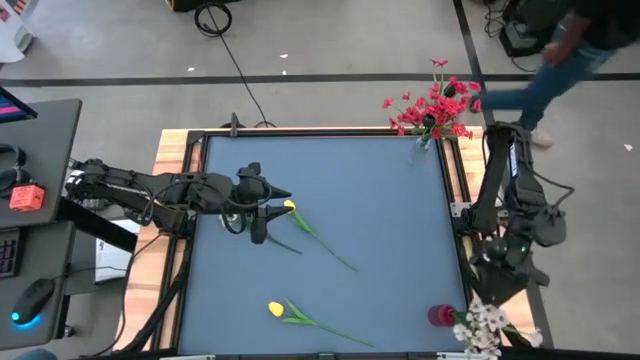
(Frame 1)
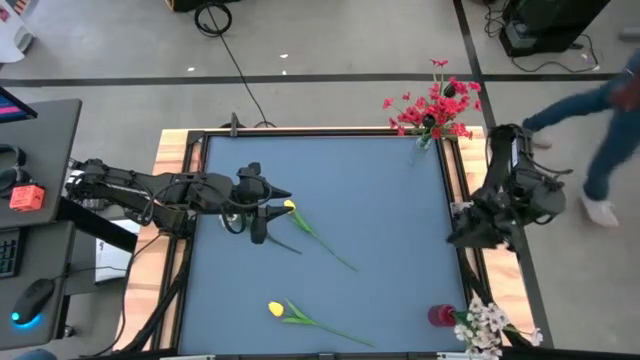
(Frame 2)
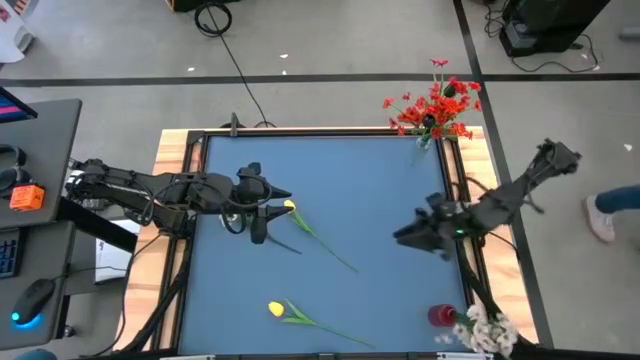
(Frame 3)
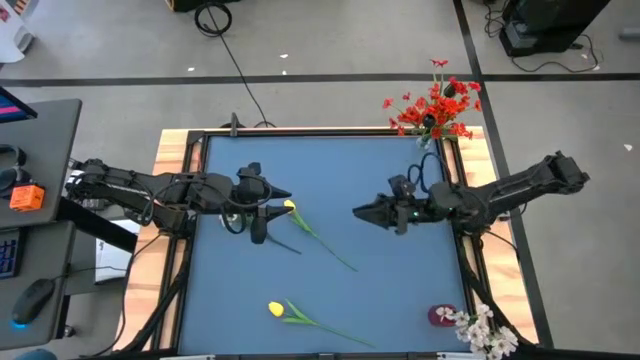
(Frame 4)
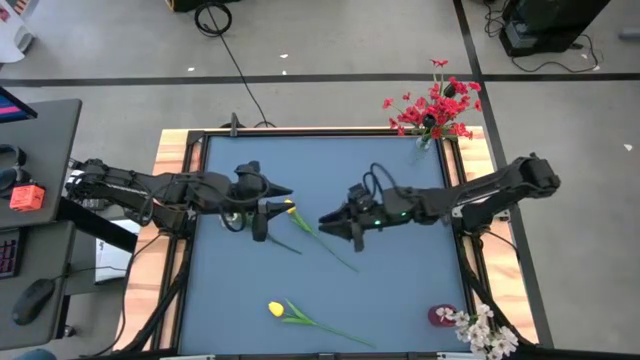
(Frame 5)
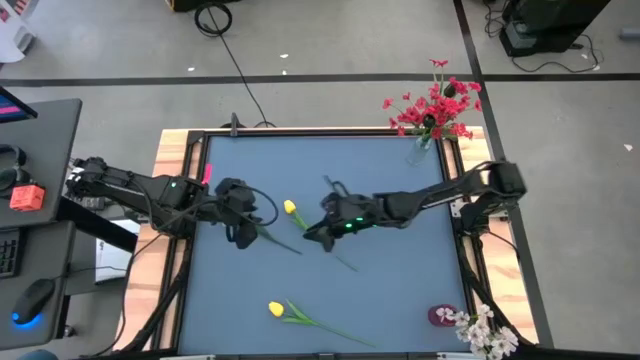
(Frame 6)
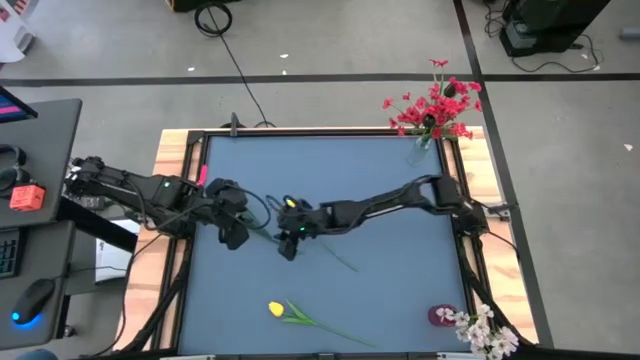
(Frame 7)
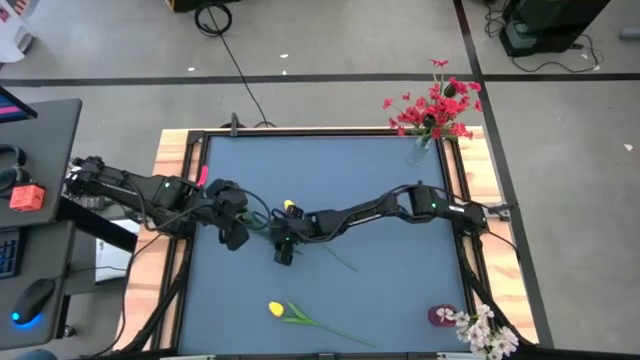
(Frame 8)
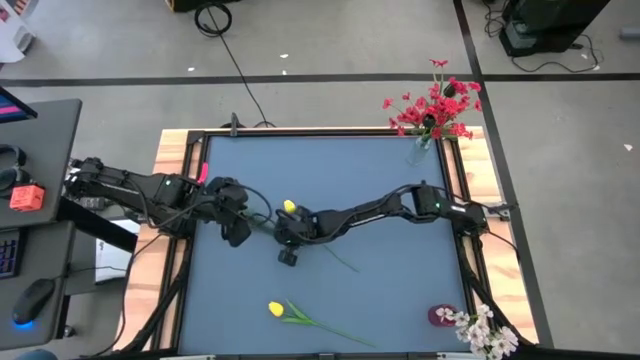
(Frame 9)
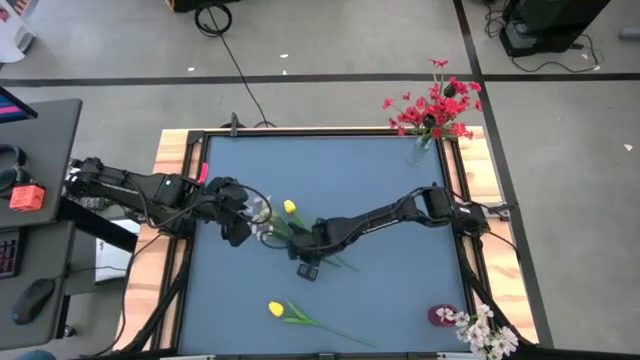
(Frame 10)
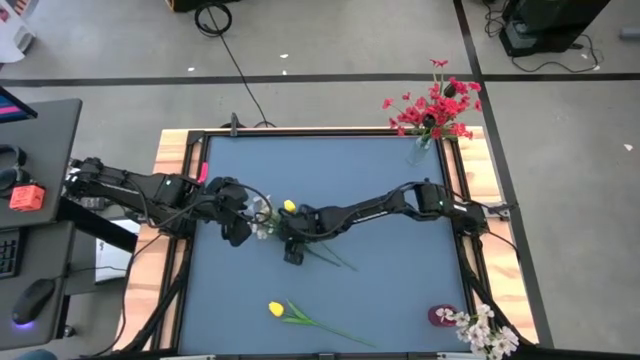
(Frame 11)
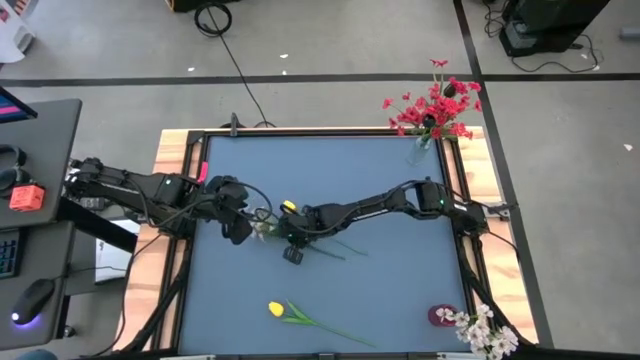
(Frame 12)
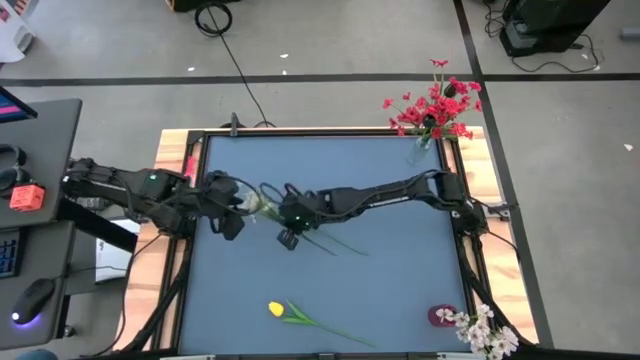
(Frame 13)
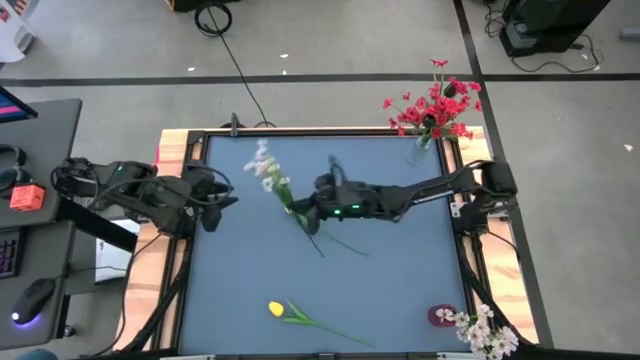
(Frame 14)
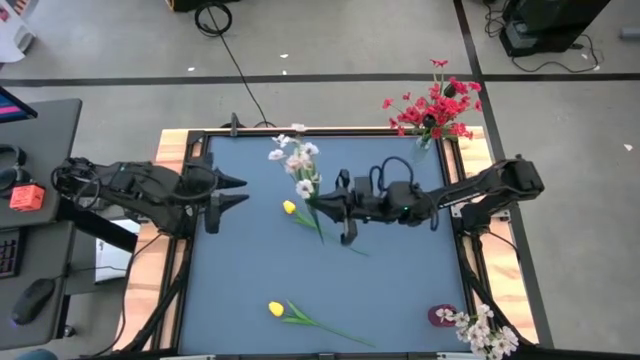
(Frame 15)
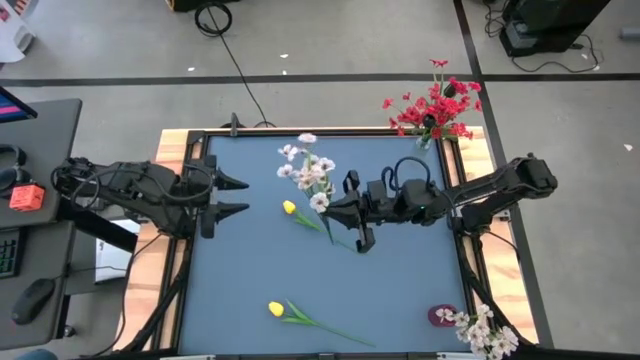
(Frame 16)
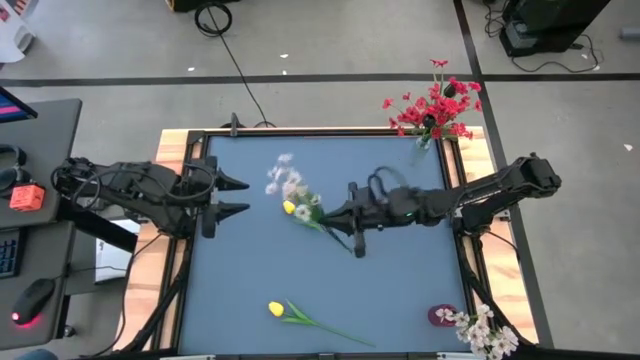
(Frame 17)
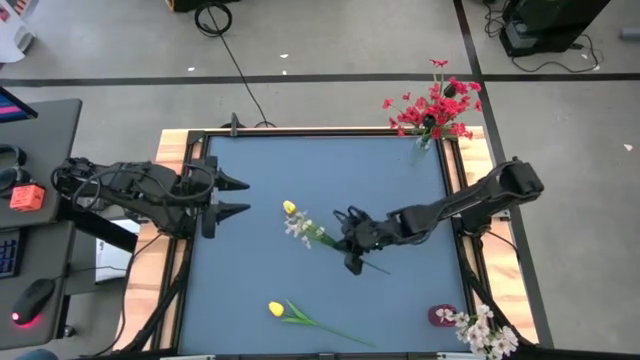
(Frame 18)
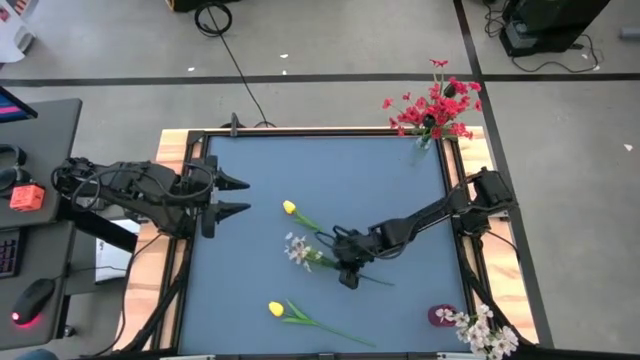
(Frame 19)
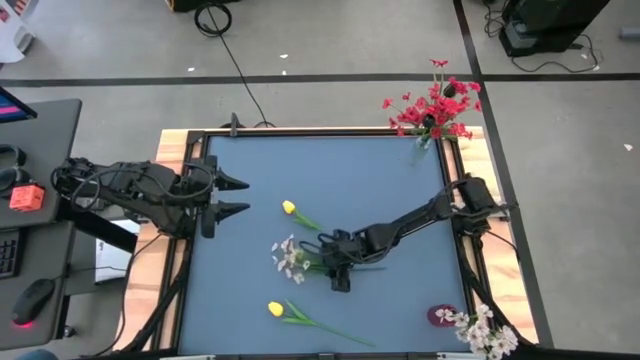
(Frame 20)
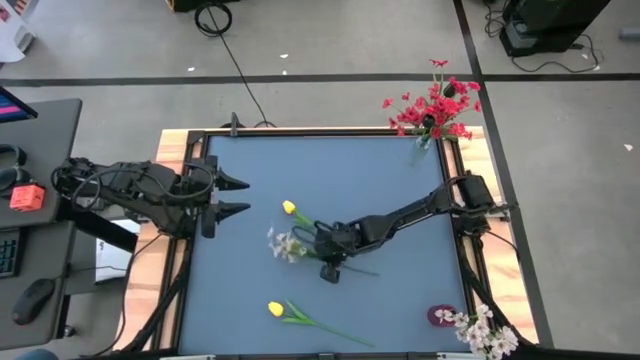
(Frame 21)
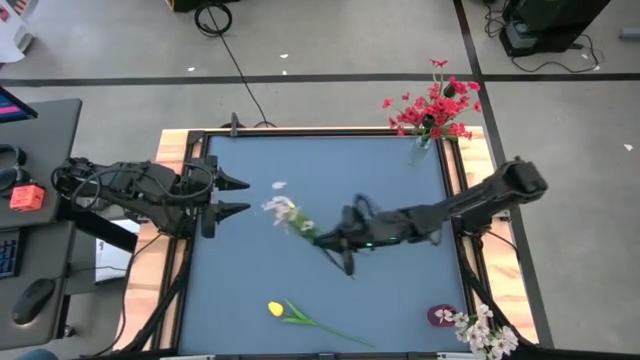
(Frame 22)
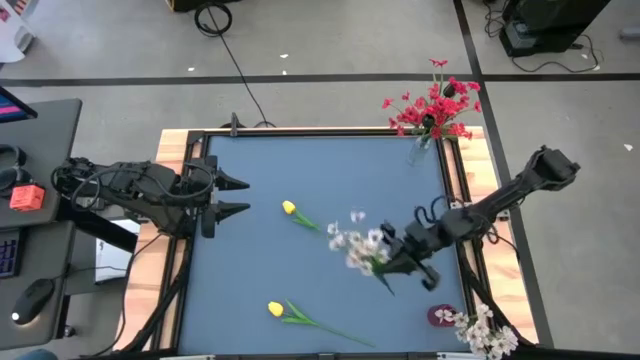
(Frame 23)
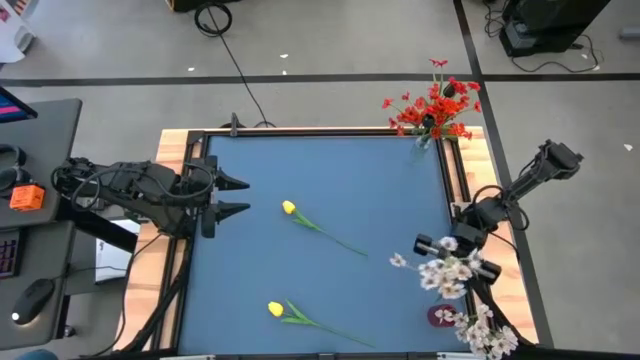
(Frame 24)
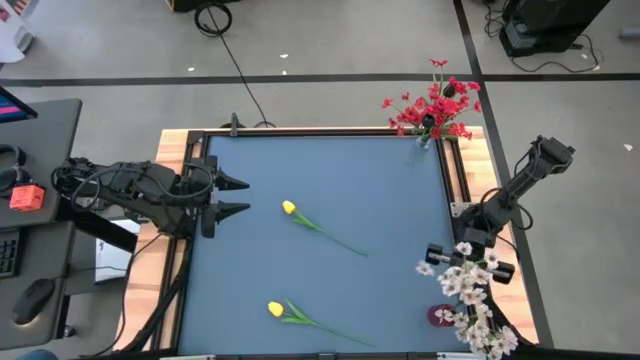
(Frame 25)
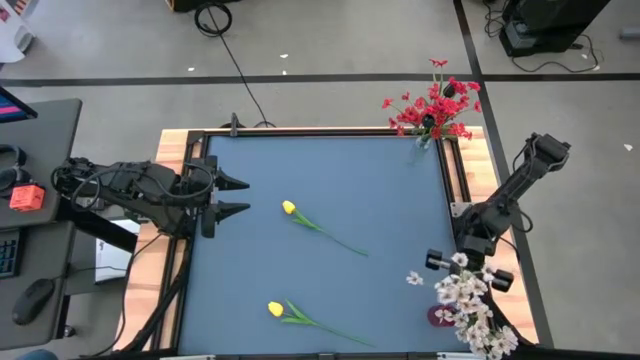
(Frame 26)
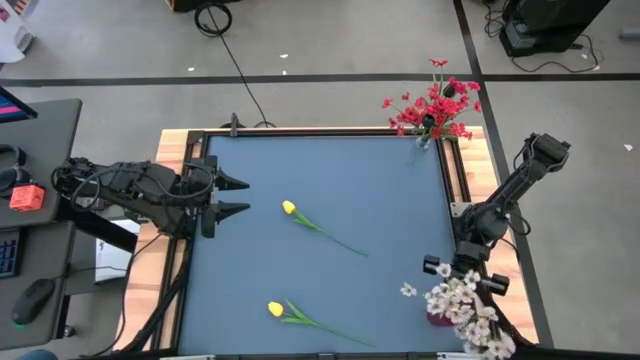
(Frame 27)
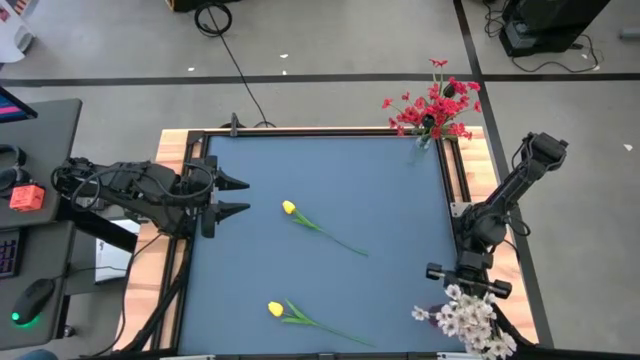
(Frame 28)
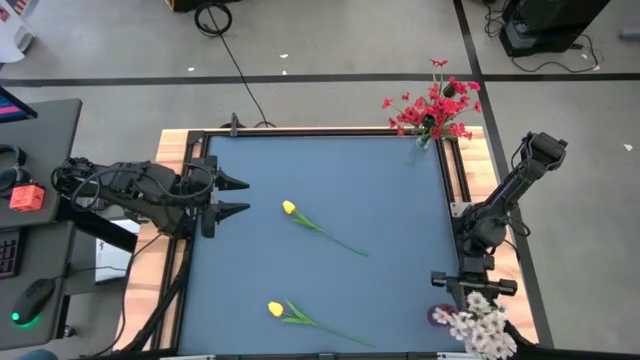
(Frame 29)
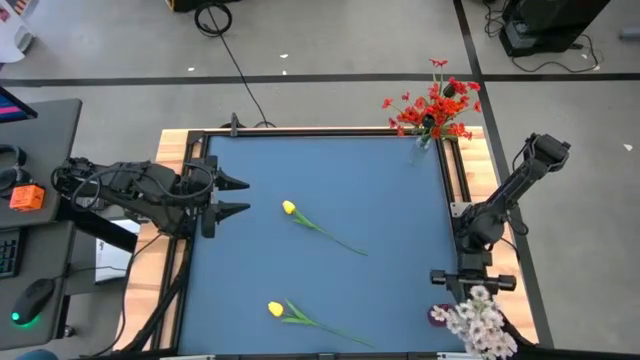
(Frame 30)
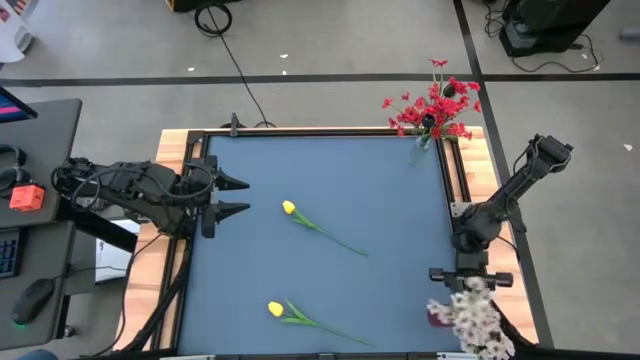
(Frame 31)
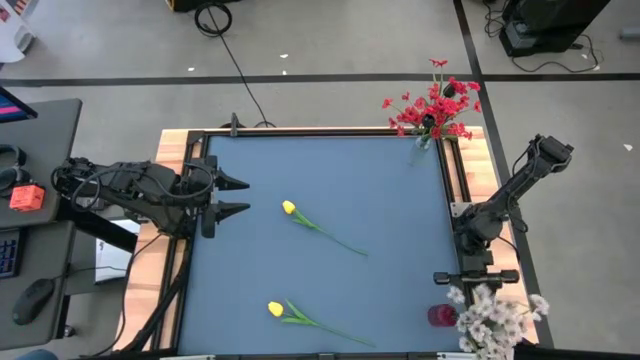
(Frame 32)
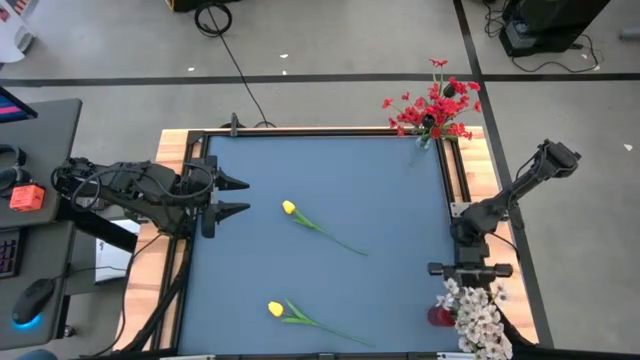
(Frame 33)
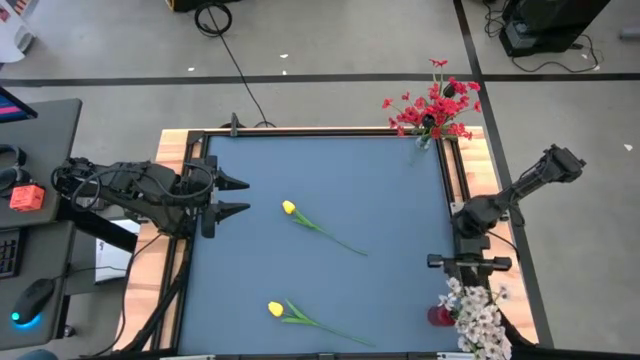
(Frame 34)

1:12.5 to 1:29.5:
Task: Sort flowers into vase by color
Put the white flowers into the red vase

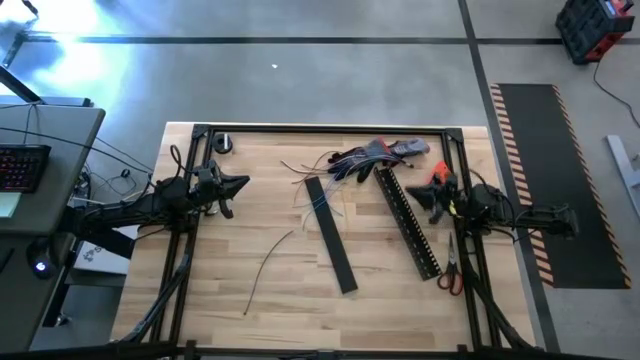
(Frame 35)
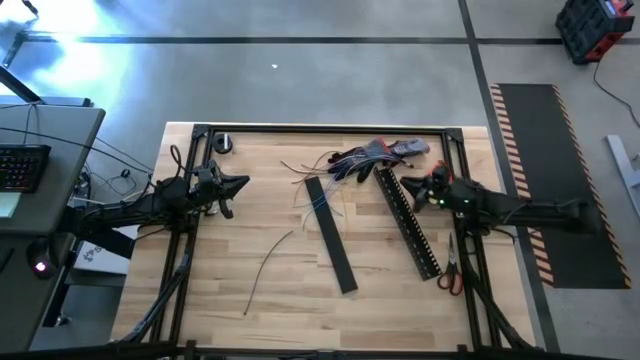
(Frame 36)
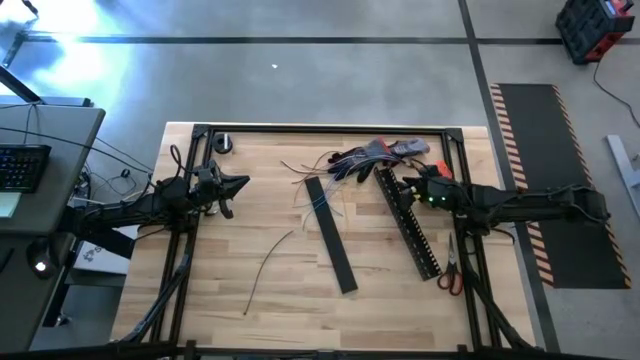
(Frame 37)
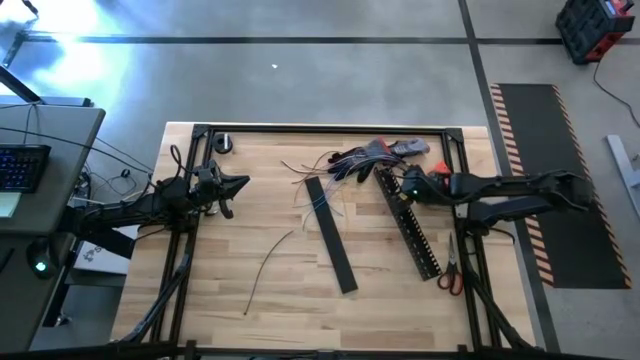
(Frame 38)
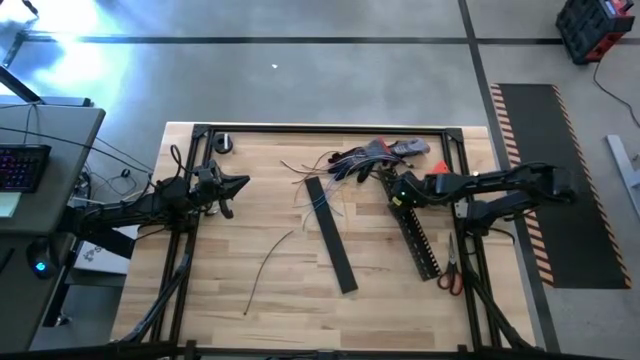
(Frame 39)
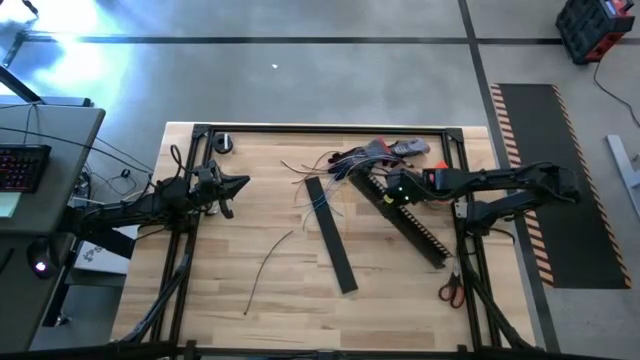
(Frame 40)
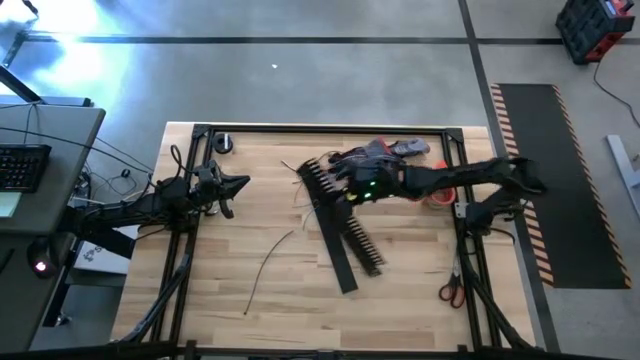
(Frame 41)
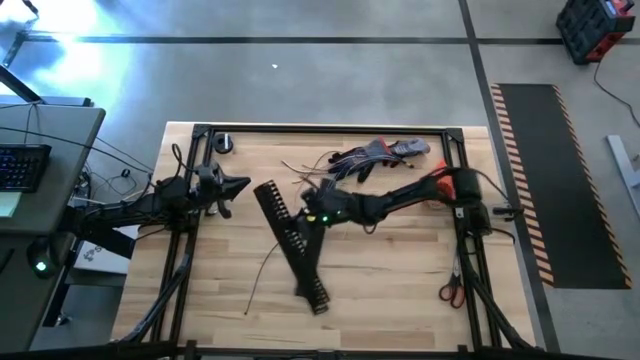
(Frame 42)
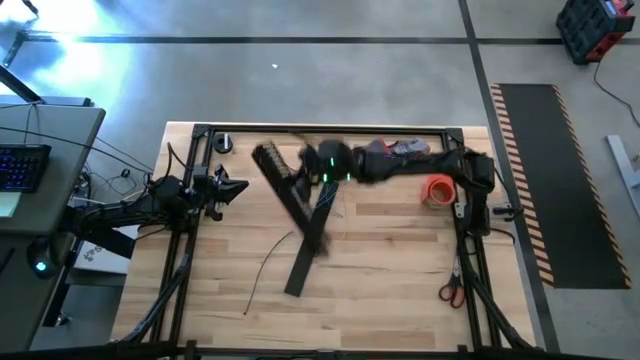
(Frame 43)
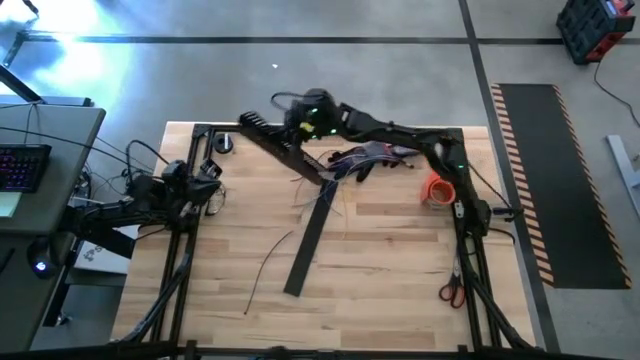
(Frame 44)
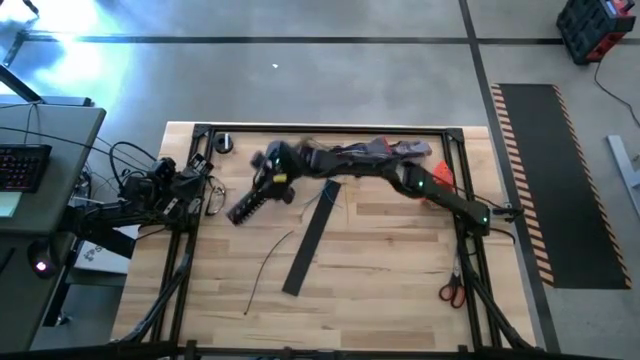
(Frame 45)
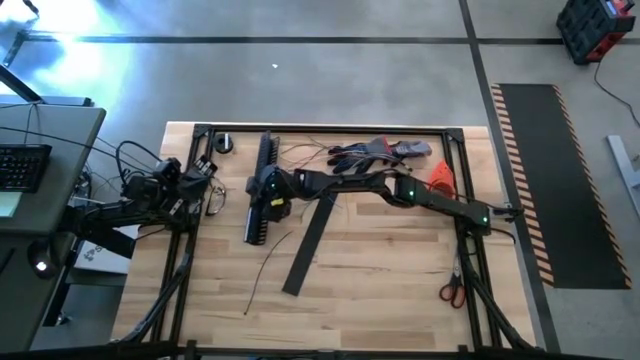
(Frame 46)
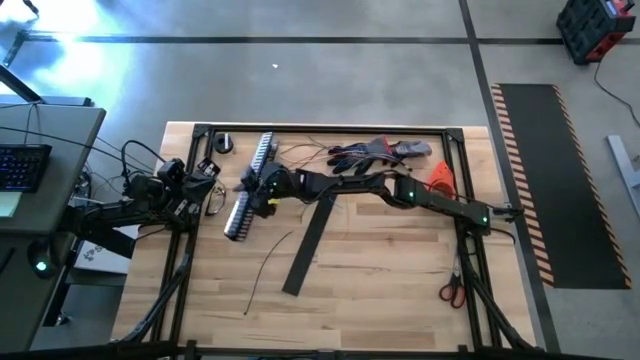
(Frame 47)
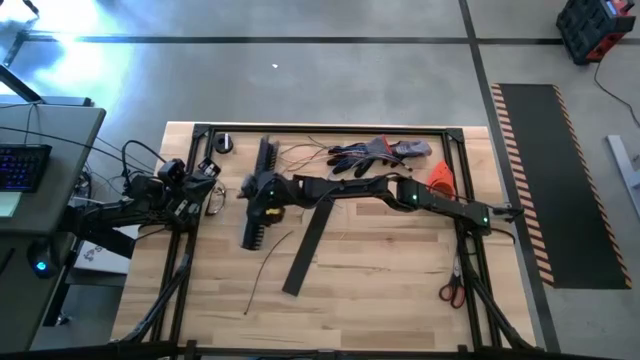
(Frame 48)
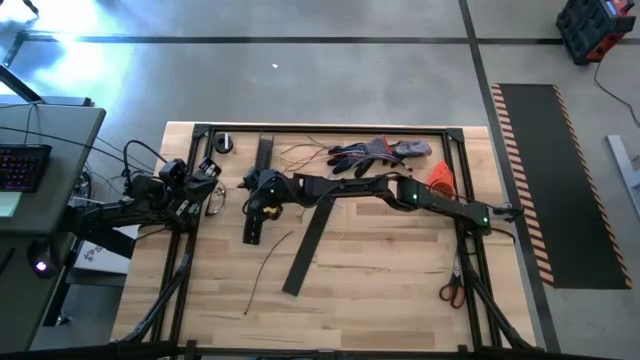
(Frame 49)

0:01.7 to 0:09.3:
Task: Ziptie cables
Put the black cable duct to into the top left of the table
